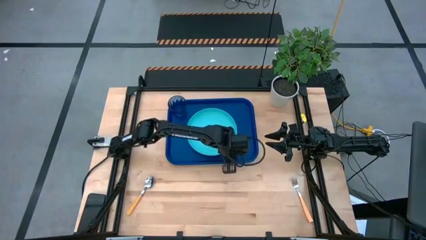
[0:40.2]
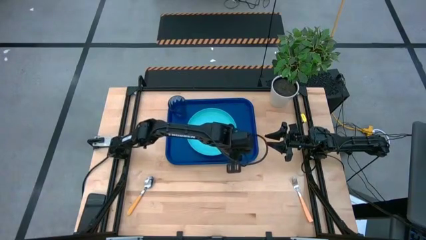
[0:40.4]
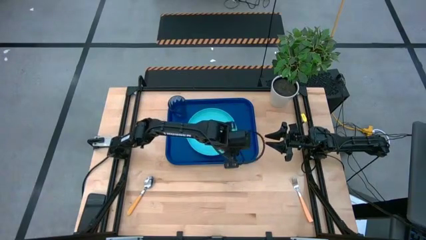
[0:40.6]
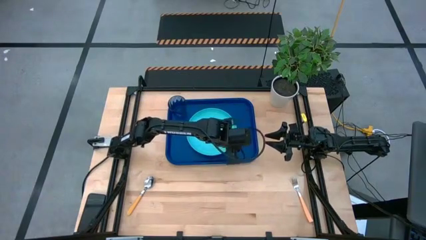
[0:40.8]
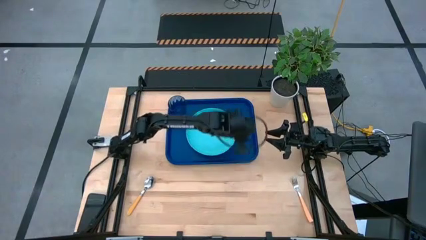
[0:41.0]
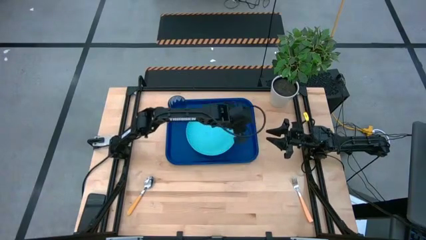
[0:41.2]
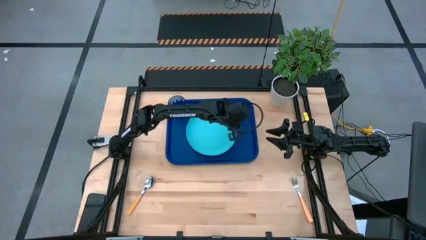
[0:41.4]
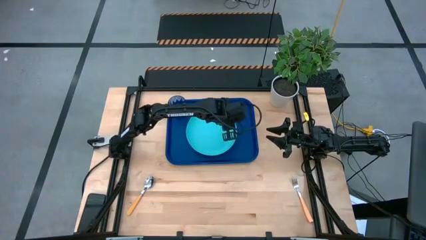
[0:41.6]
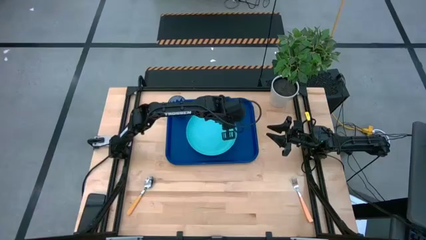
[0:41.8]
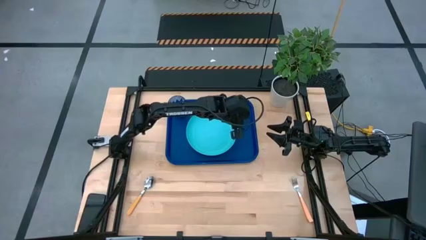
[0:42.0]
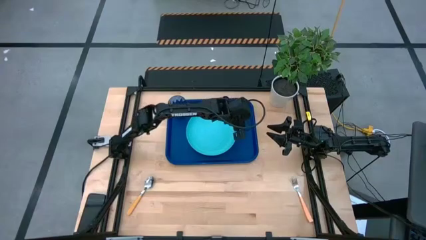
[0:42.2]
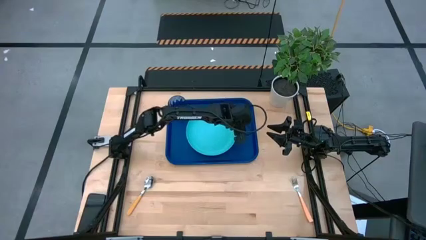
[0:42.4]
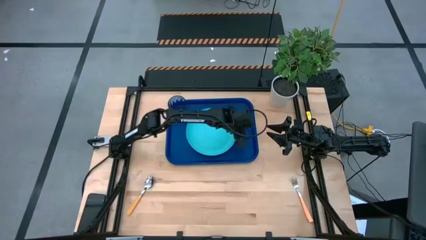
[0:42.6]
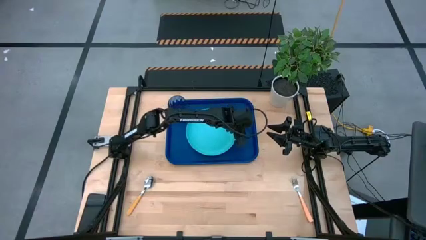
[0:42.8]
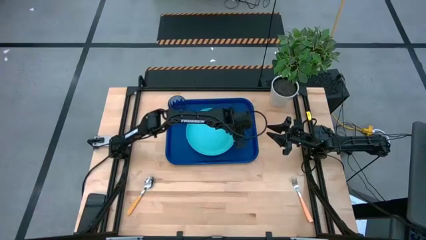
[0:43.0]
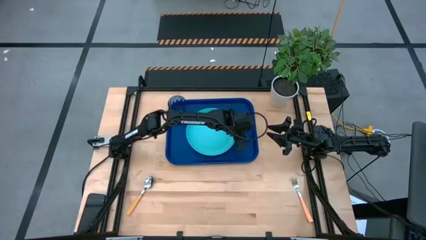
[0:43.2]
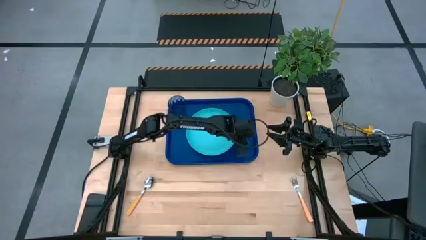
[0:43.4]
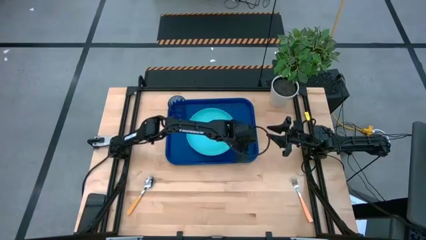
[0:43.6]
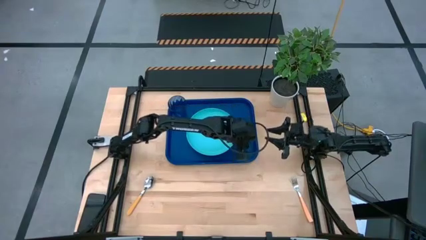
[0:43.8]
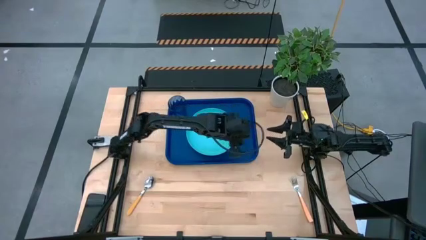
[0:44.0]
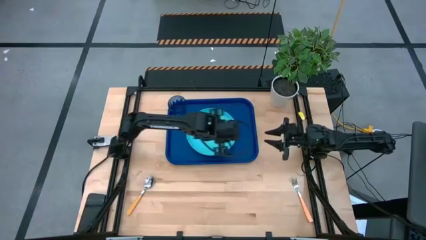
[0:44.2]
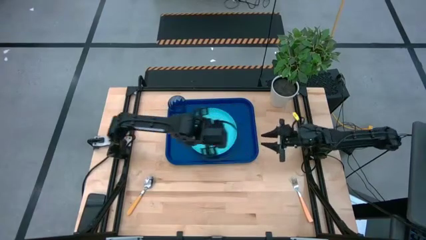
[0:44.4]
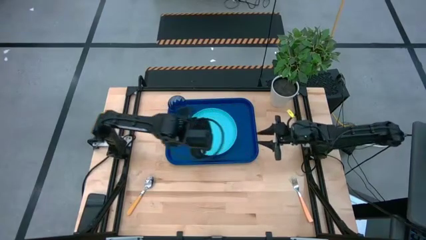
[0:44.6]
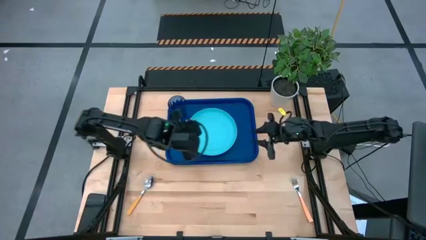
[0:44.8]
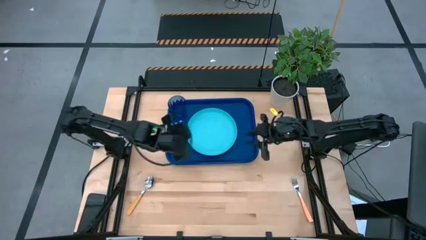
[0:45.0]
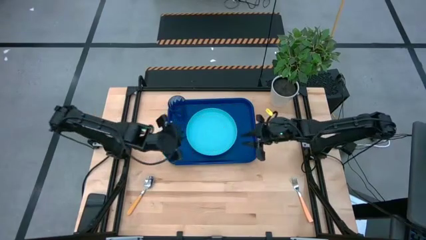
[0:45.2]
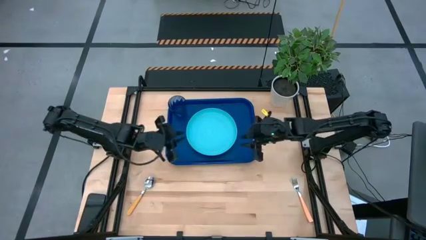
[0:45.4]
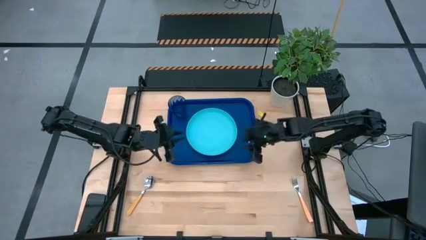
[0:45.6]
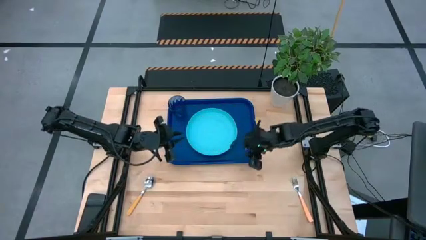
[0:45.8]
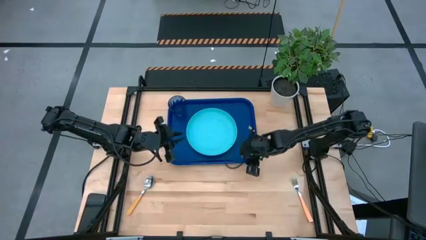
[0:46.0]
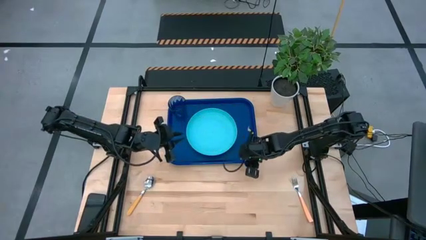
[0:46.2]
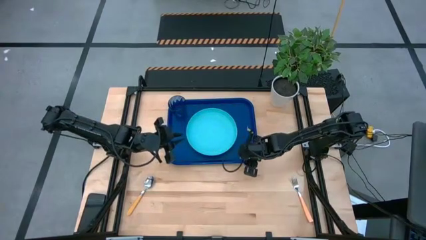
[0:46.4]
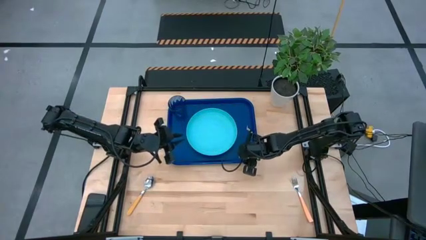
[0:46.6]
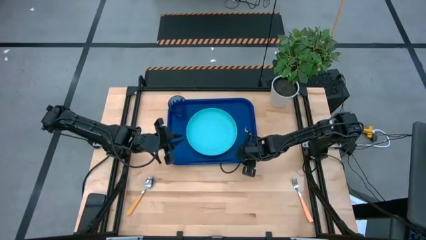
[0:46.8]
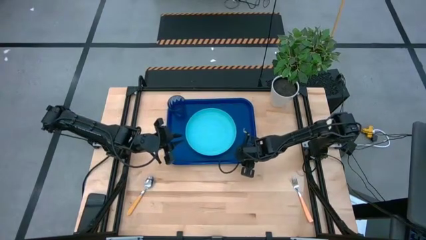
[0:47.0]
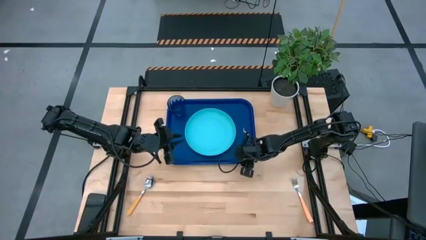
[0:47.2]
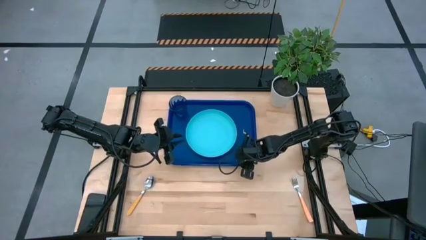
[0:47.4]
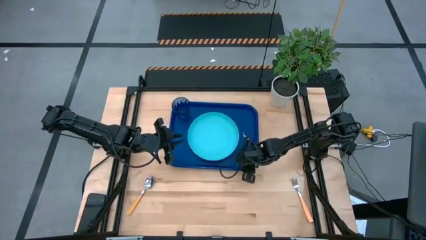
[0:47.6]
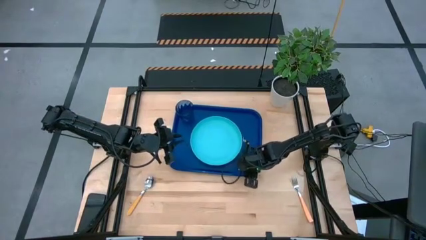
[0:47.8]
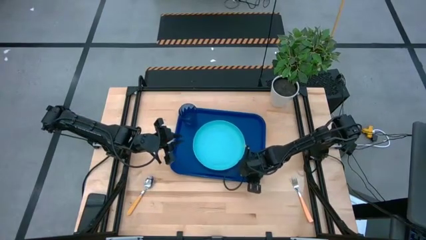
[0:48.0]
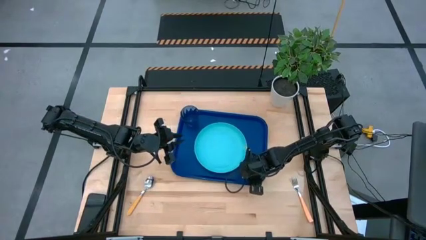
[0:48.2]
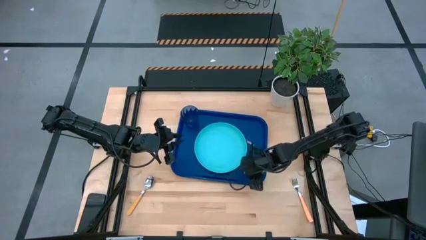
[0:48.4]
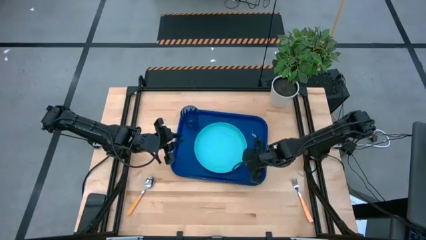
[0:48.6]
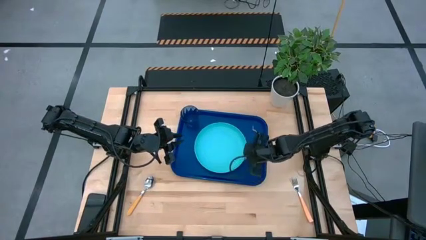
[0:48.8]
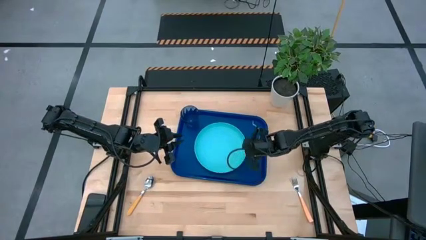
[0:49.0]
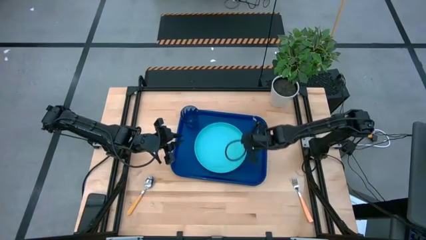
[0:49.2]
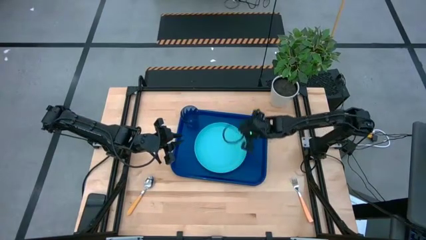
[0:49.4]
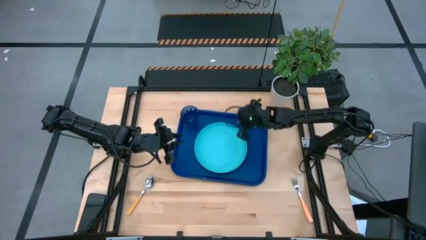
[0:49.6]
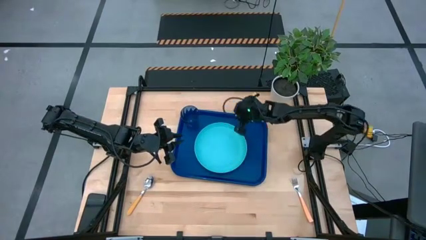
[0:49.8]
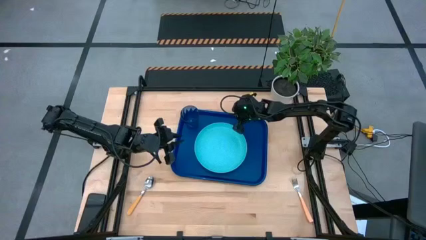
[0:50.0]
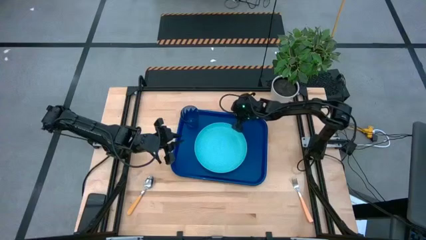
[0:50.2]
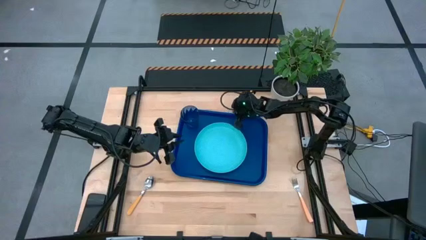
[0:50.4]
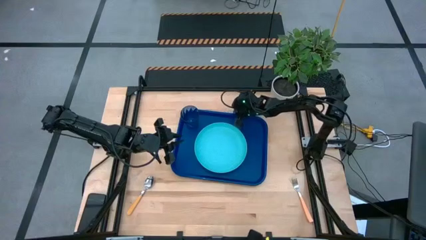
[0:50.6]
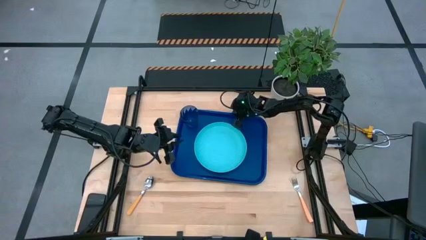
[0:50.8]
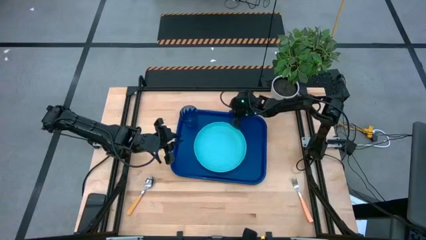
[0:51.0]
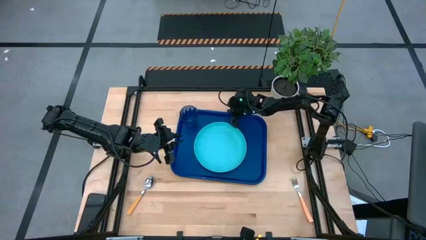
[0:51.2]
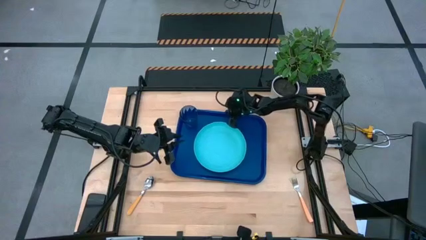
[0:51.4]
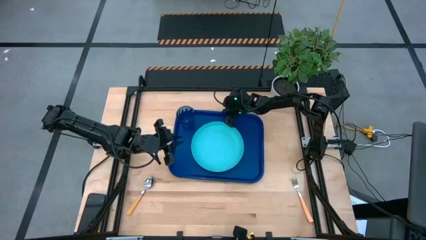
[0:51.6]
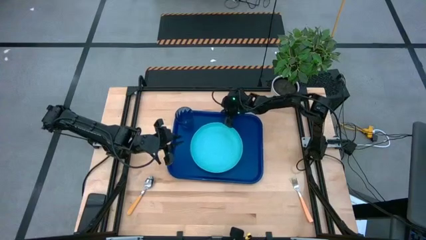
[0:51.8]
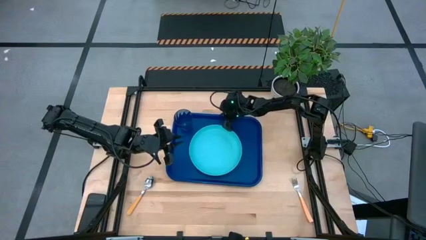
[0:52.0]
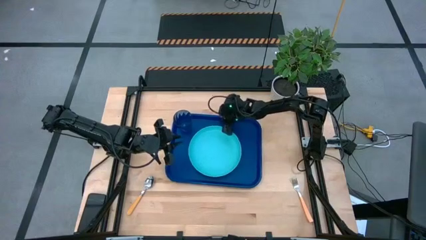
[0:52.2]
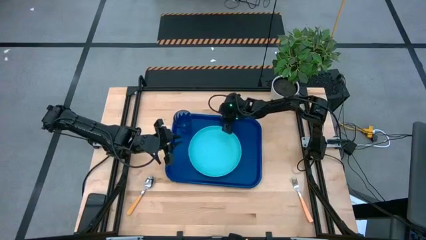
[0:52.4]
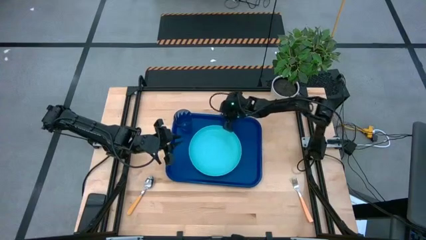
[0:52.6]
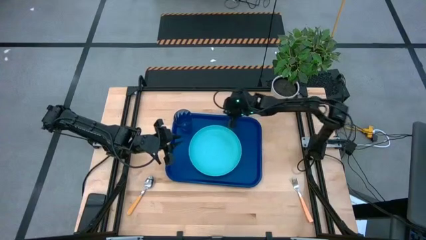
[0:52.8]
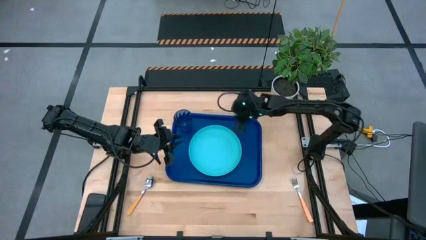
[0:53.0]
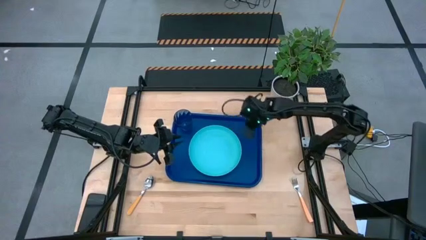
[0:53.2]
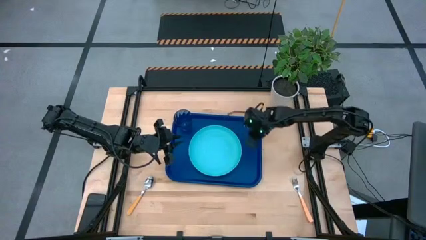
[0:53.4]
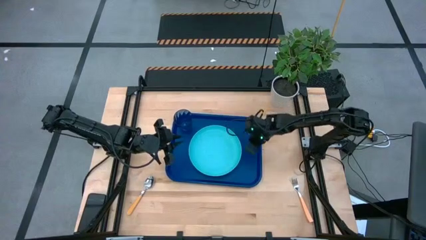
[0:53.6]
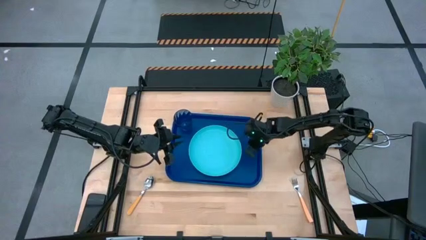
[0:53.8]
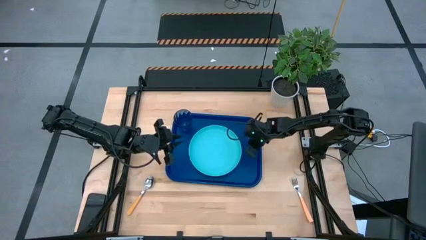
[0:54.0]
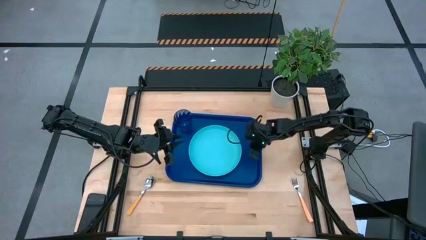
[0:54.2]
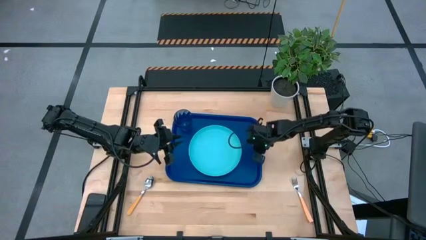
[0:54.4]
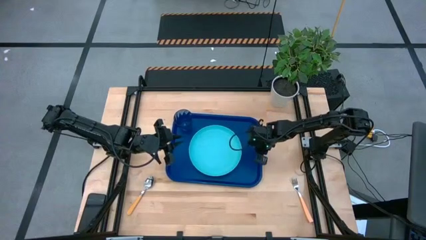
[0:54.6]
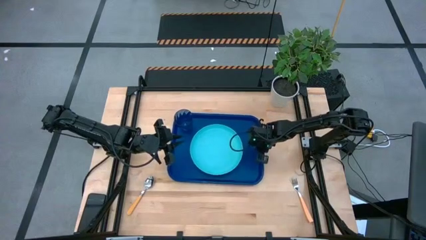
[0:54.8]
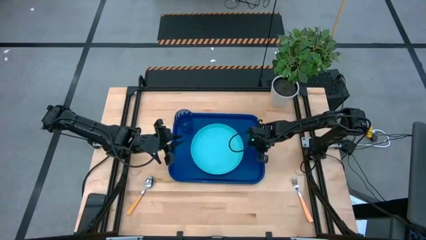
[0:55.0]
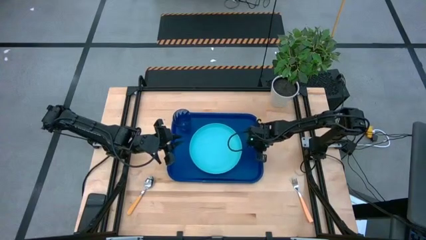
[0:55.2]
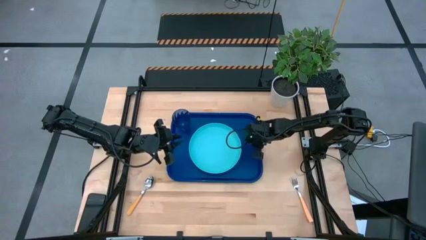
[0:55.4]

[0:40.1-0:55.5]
Task: Pick and place plate/cup/fork/spoon on tray
Adjust the serving tray

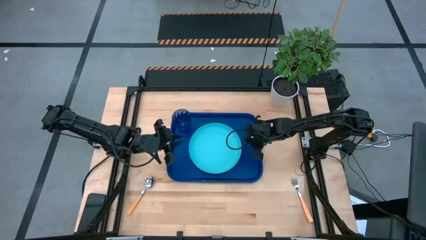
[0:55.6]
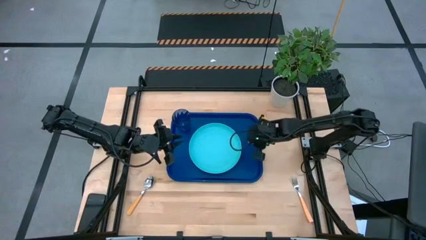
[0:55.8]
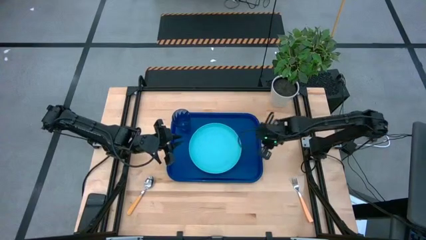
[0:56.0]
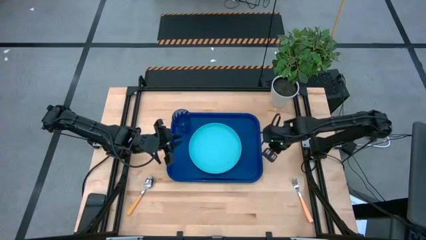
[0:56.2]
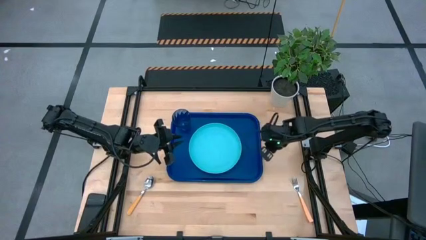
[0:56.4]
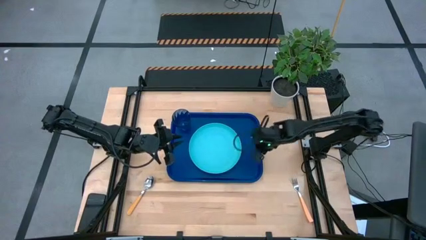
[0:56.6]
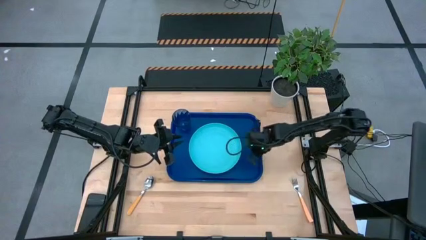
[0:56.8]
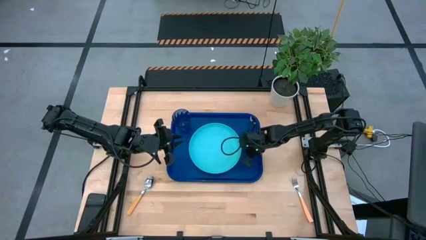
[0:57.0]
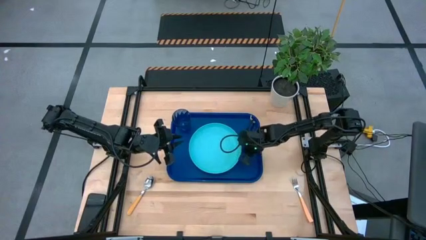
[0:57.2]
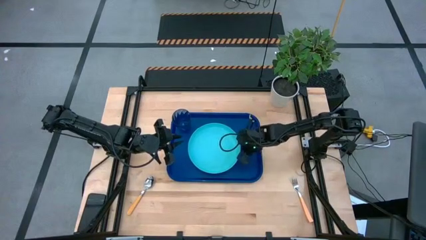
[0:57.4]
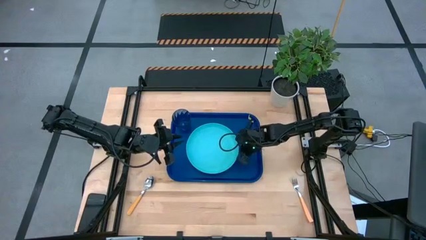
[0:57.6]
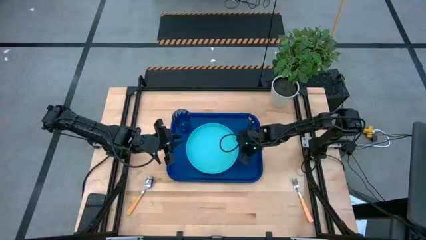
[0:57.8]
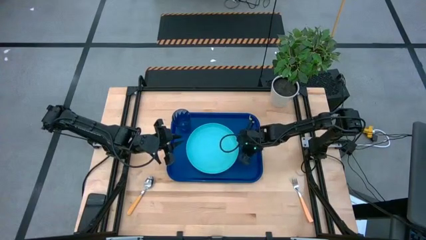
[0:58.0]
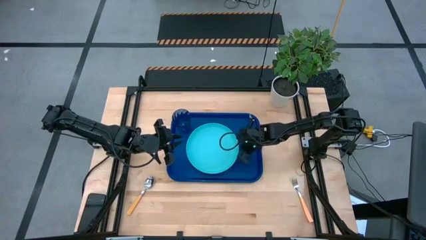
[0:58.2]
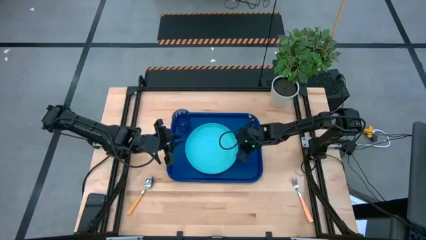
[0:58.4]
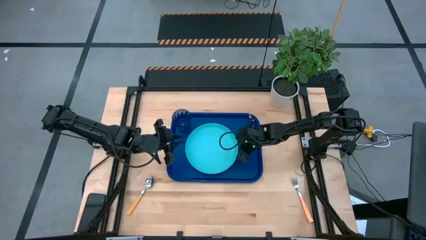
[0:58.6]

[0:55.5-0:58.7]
Adjust the light blue plate on the serving tray
